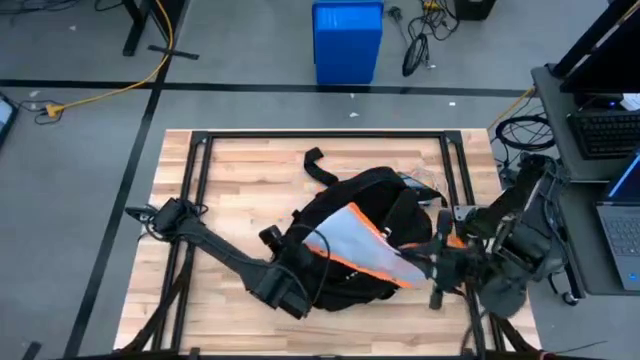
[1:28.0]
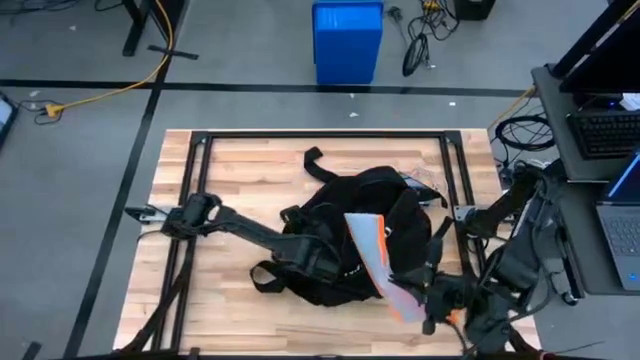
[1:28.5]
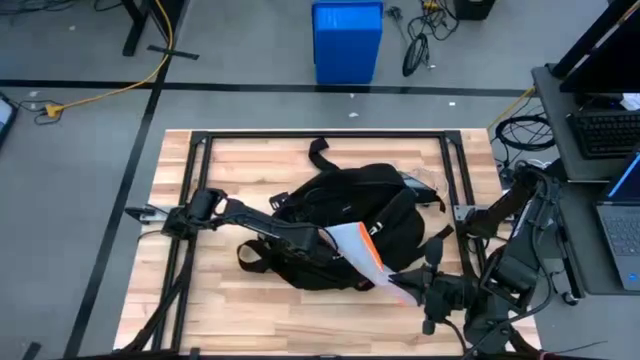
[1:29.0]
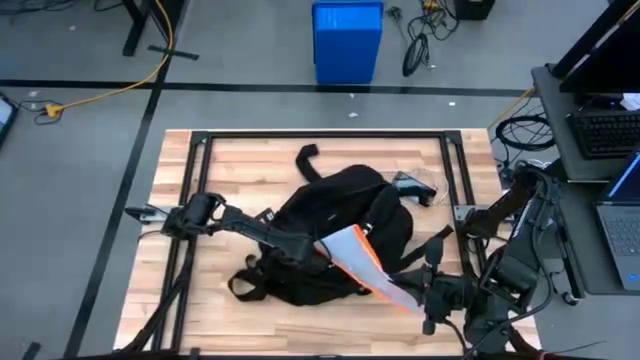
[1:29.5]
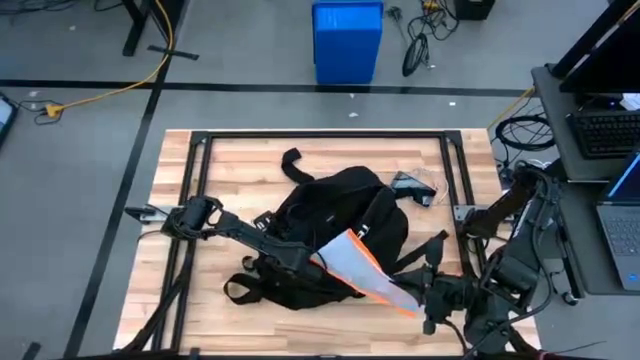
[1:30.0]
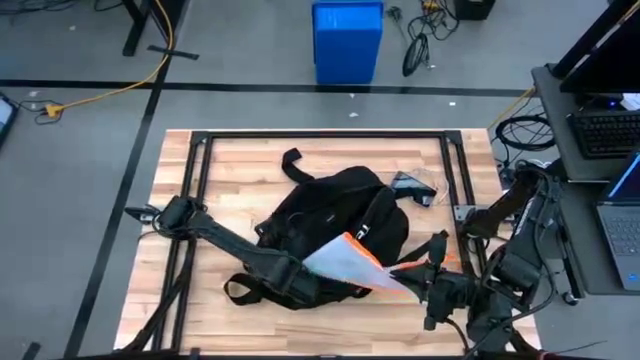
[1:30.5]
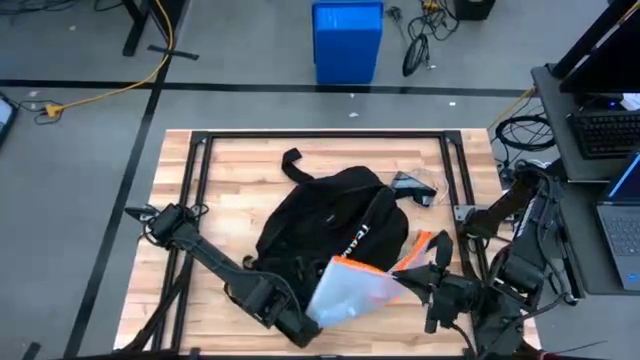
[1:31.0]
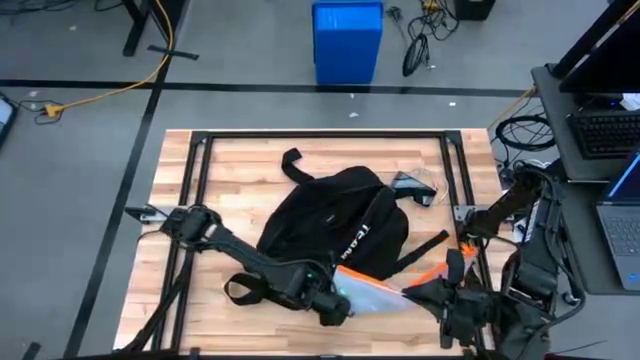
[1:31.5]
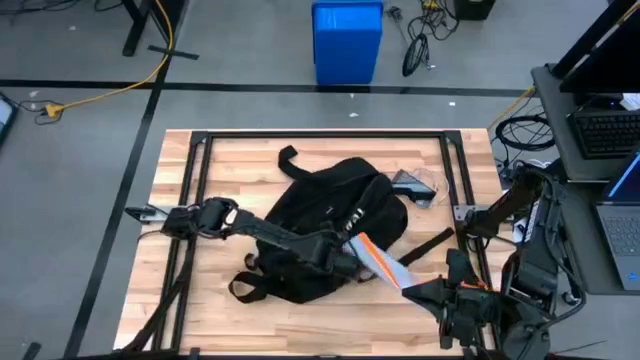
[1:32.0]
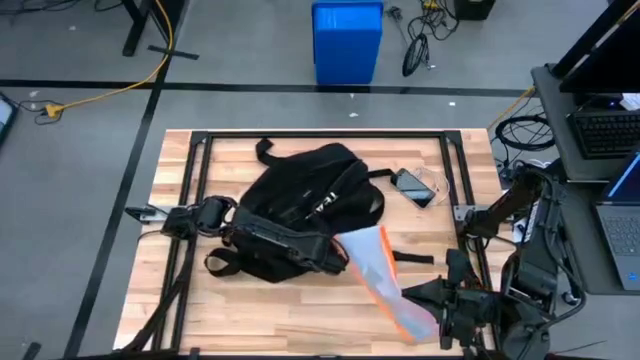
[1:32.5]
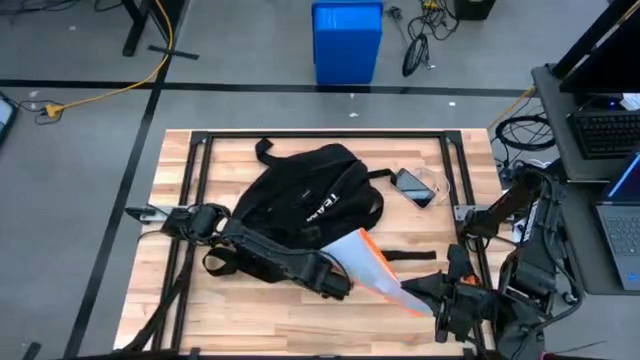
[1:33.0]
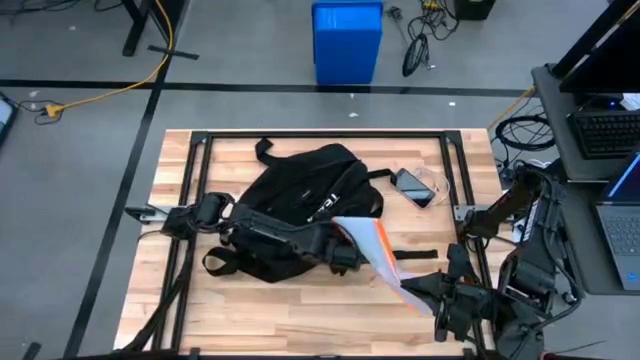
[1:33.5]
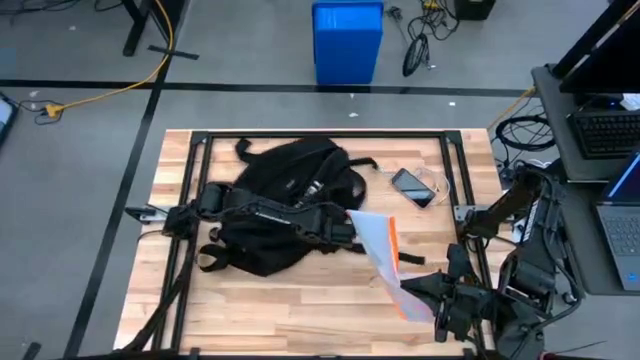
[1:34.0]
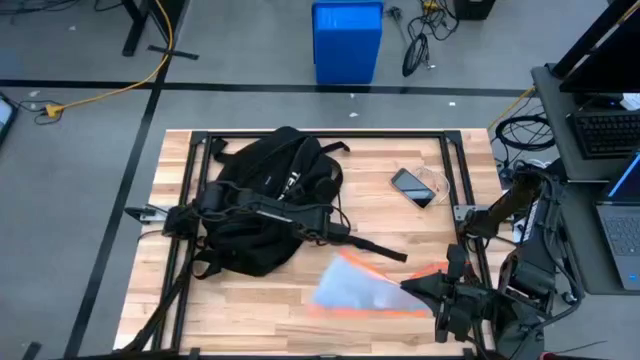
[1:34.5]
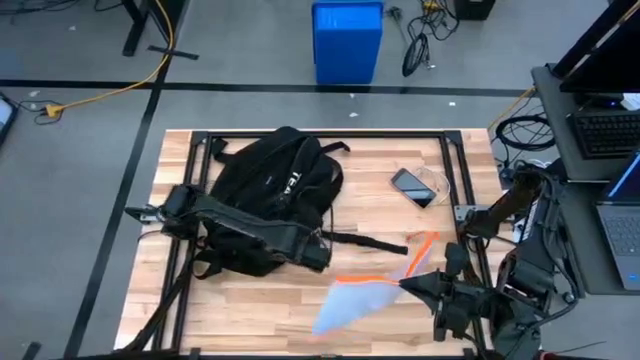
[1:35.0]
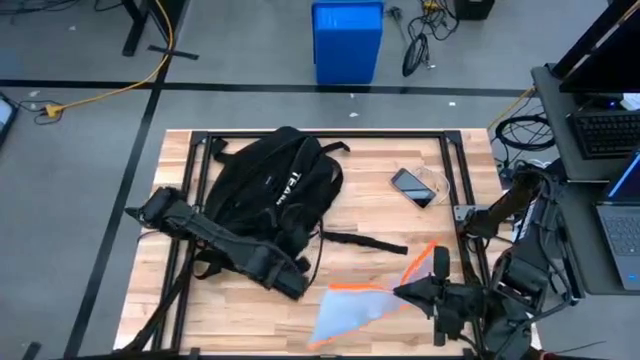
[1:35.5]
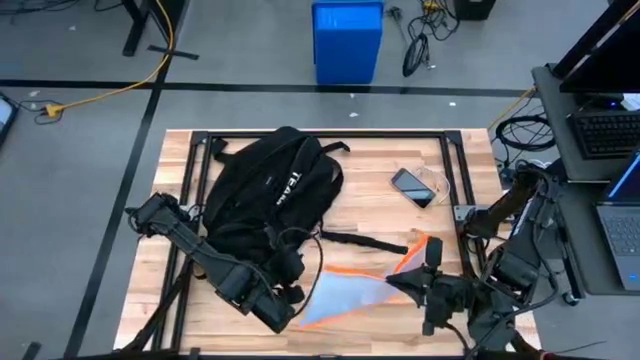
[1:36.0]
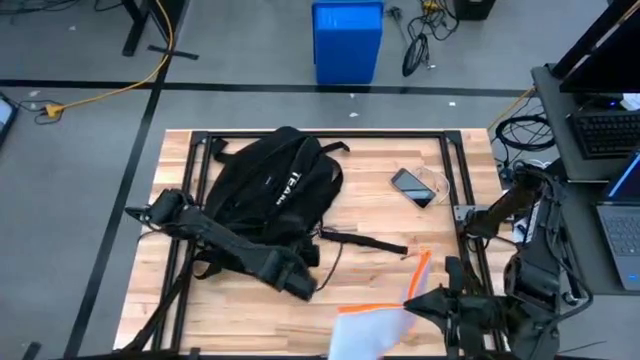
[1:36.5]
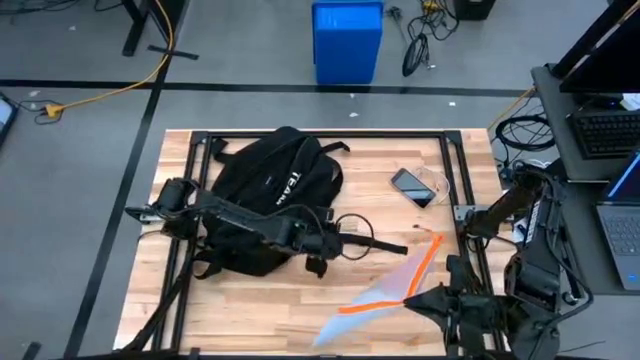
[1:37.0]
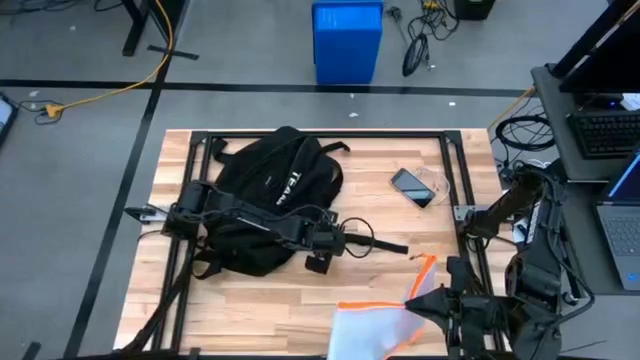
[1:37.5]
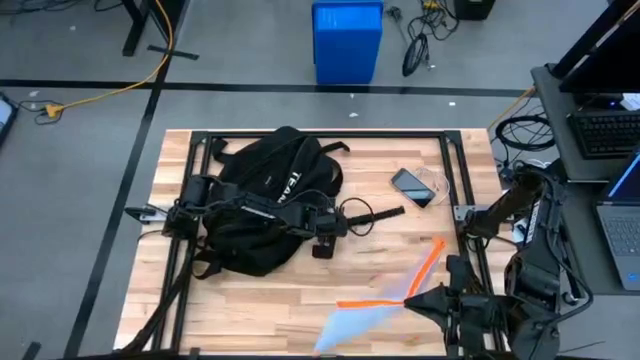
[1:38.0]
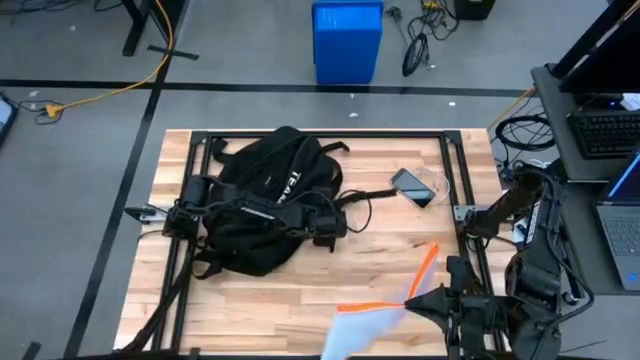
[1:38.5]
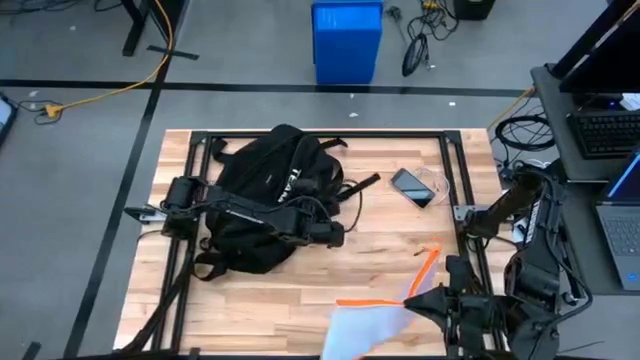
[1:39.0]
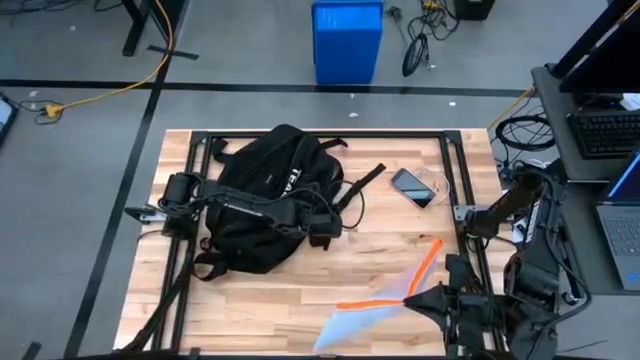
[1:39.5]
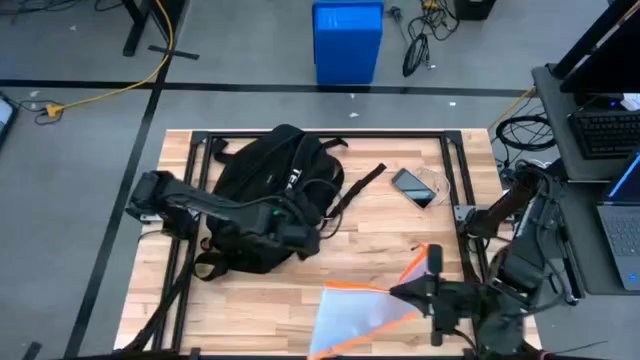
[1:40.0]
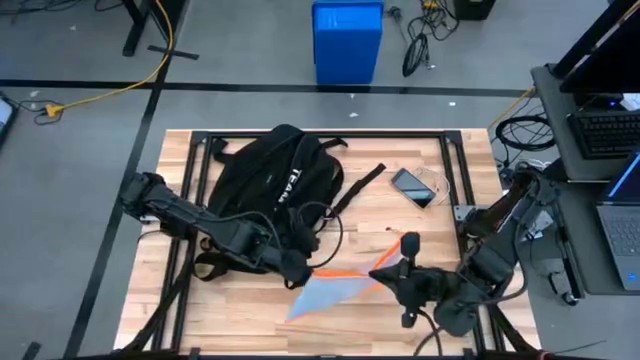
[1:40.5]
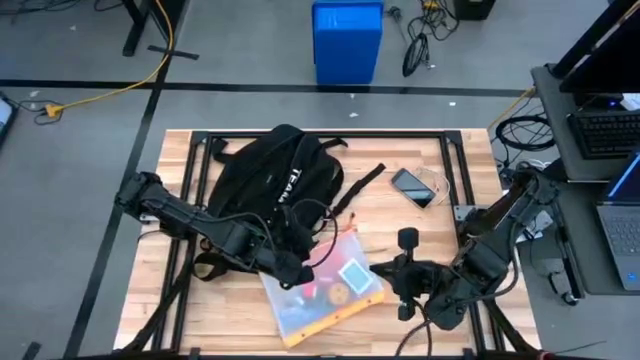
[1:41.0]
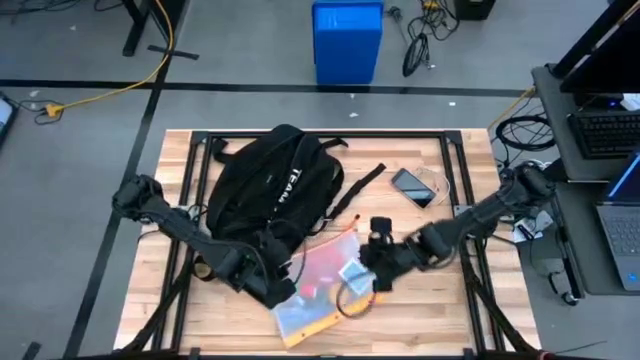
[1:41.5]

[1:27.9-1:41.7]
Task: Unpack backpack
Remove the zip bag from the black backpack

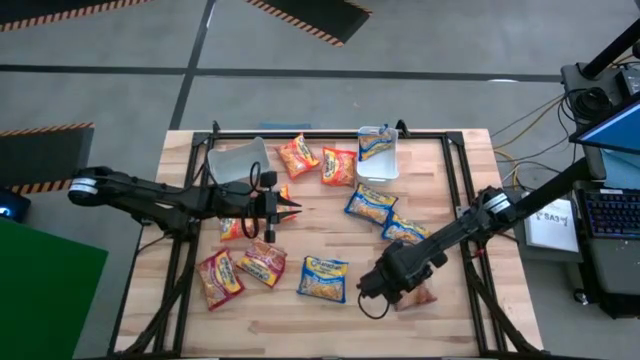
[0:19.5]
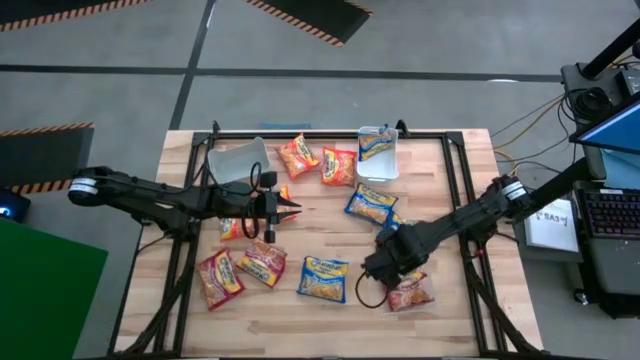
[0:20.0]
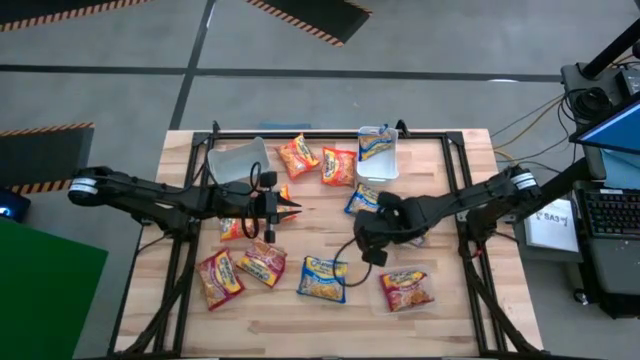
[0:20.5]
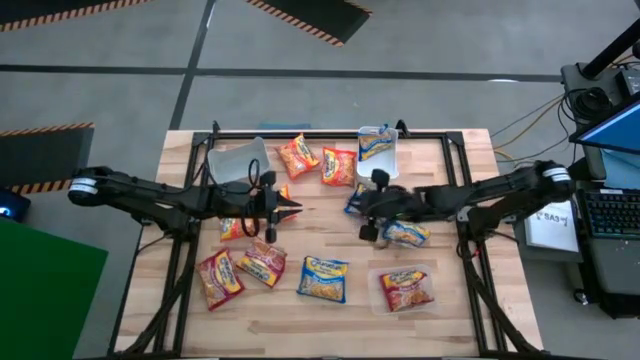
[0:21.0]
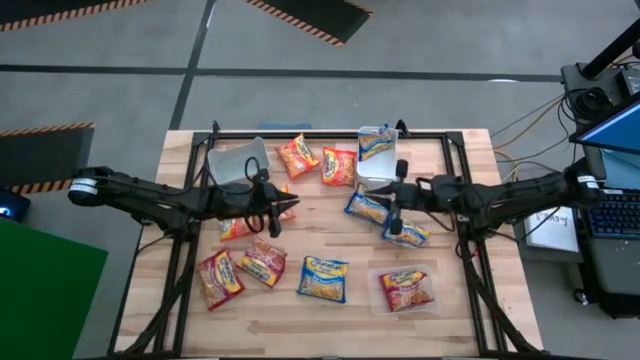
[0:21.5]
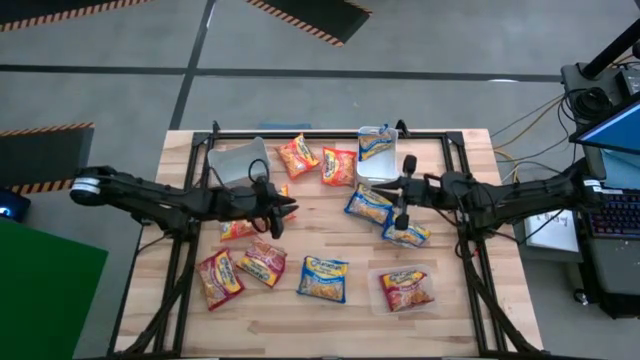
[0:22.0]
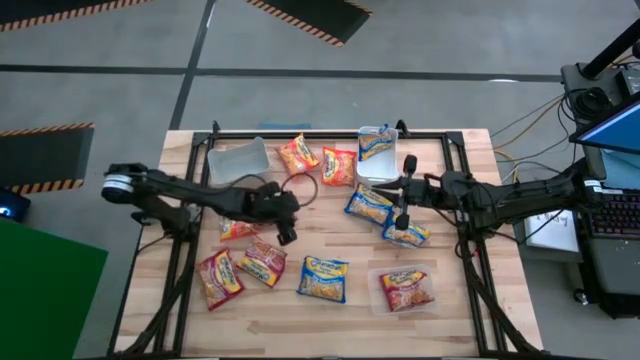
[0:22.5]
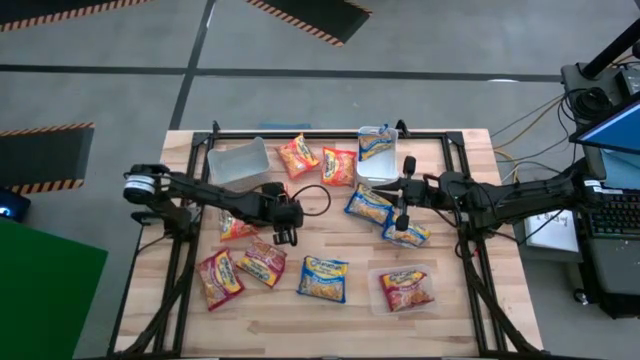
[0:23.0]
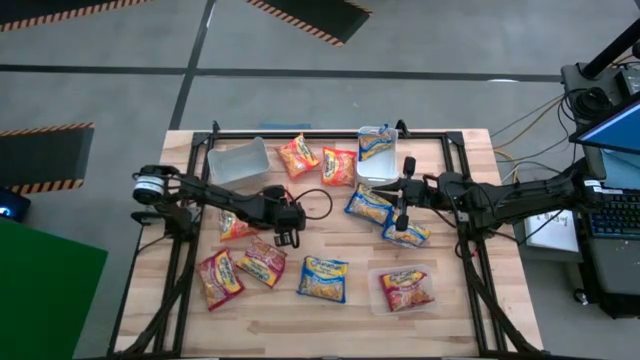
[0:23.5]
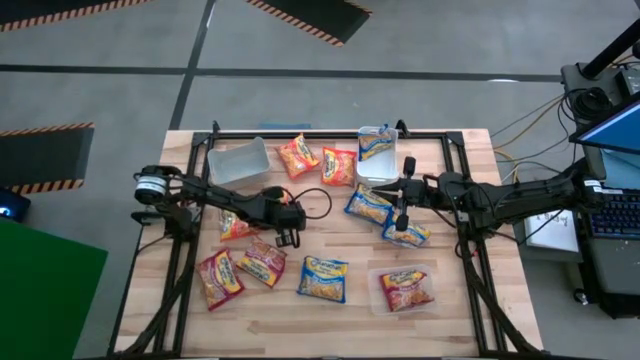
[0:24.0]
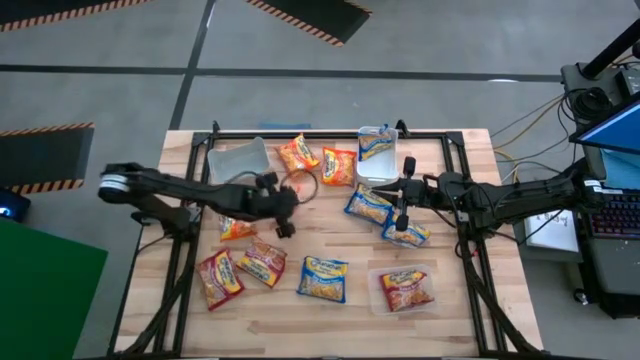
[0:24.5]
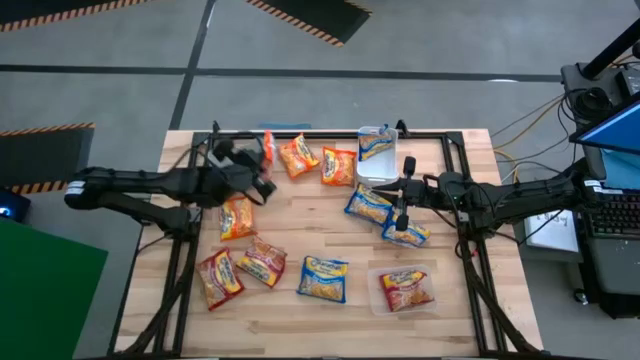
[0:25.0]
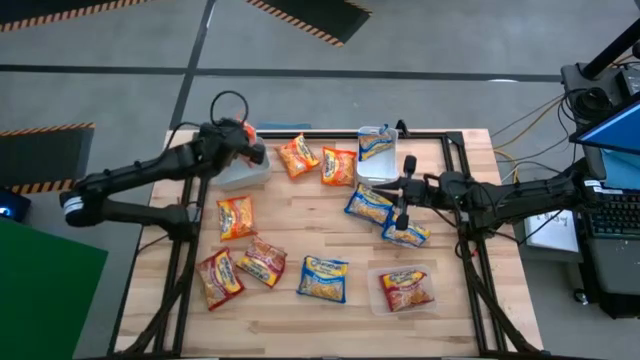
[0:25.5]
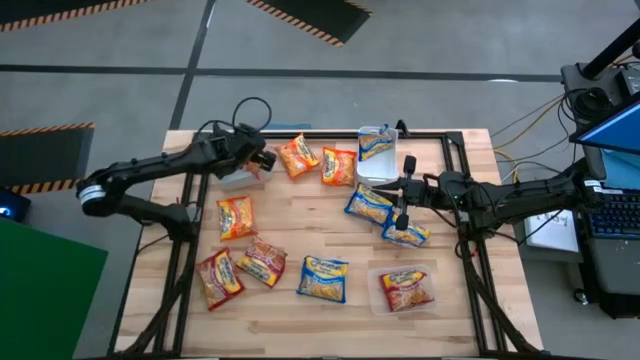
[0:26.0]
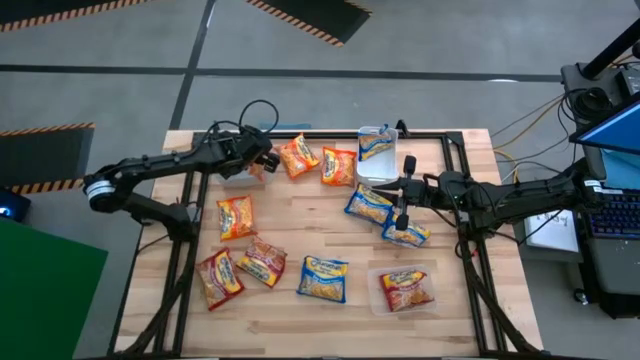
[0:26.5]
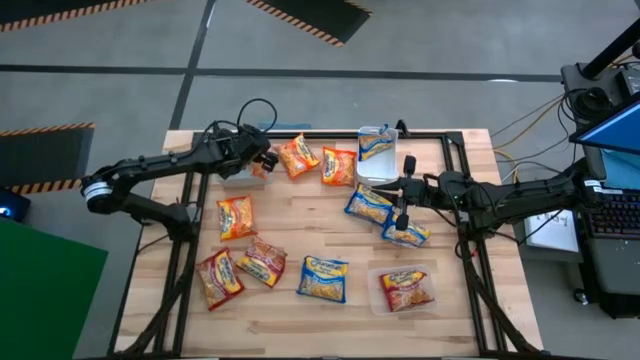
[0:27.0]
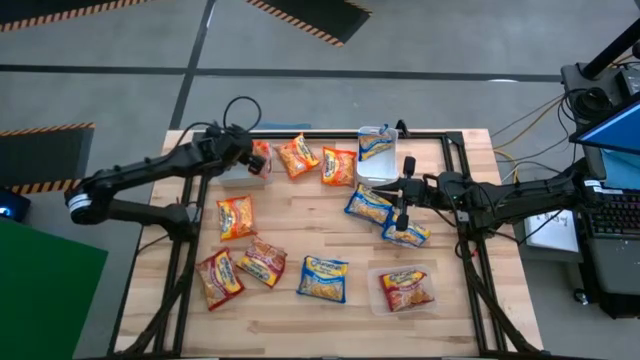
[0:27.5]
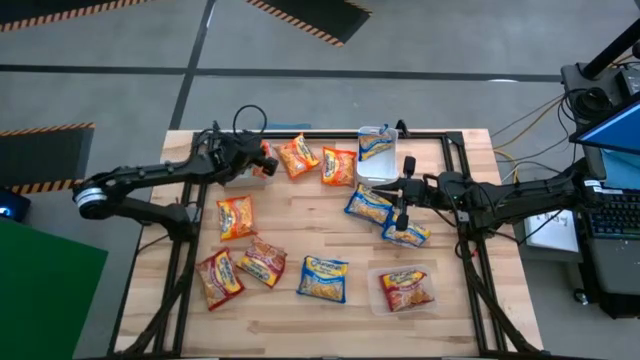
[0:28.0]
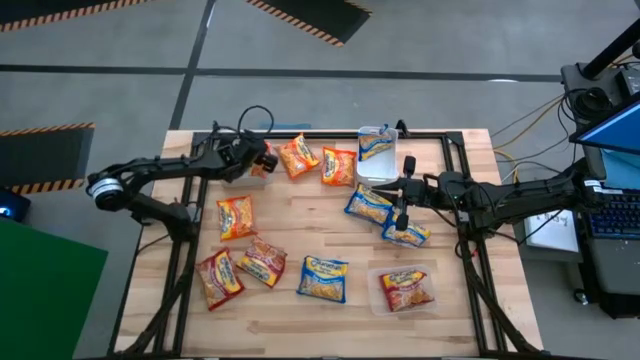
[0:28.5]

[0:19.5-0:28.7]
Task: Sort Maruchan noodles
Put the orange noodle pack into the gray bin
